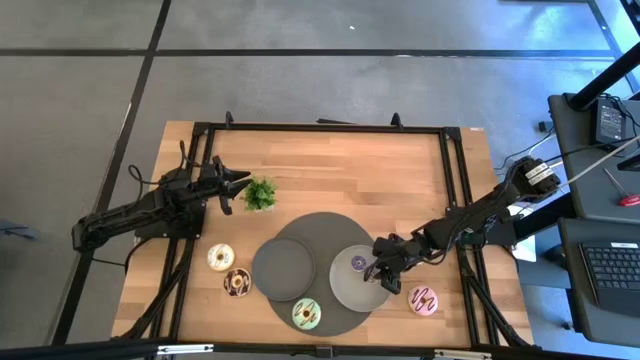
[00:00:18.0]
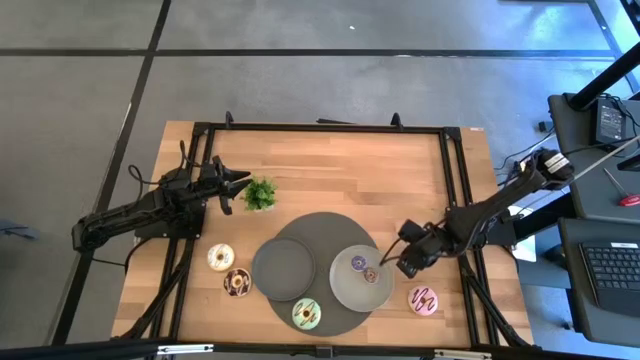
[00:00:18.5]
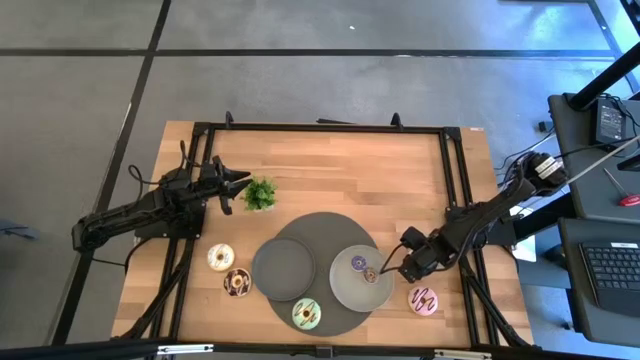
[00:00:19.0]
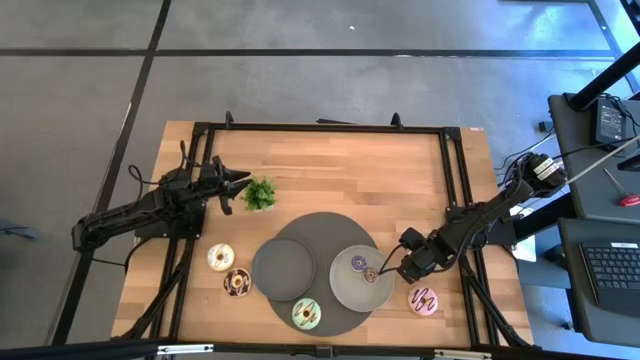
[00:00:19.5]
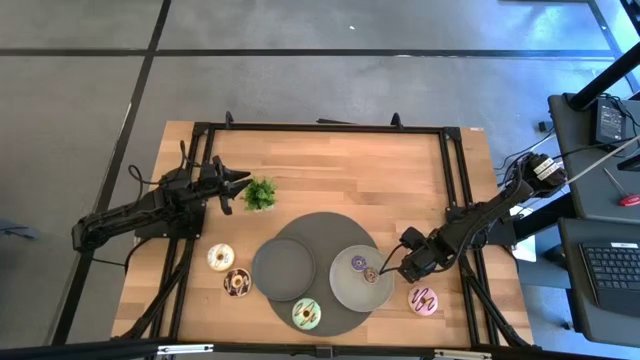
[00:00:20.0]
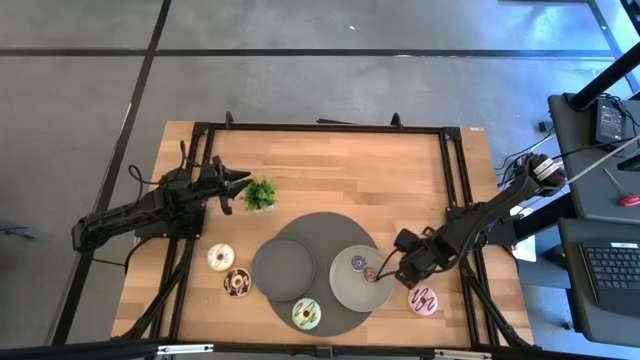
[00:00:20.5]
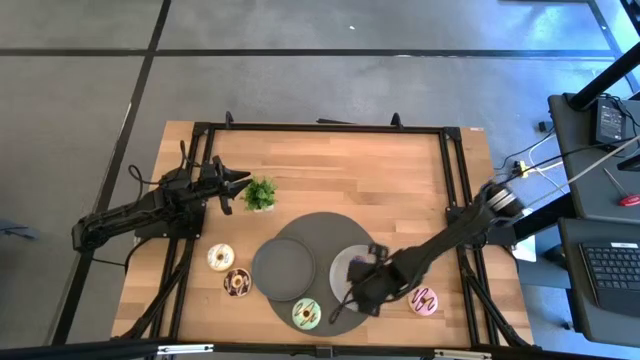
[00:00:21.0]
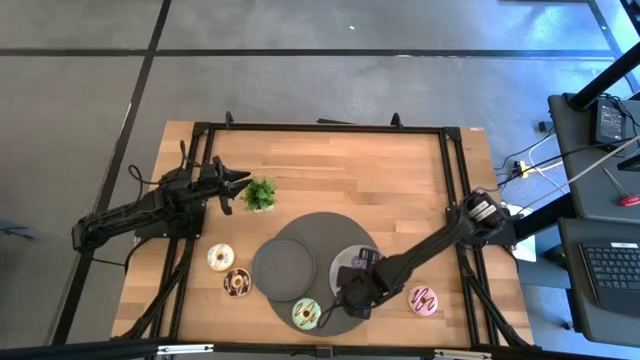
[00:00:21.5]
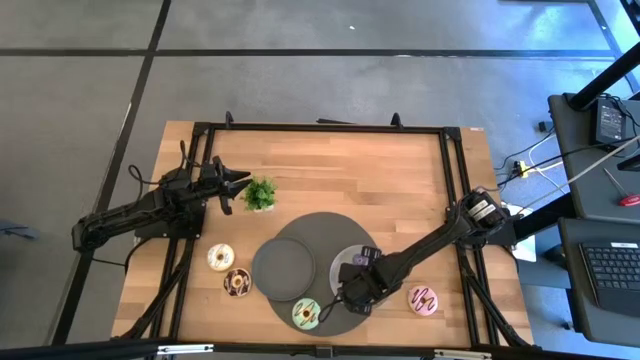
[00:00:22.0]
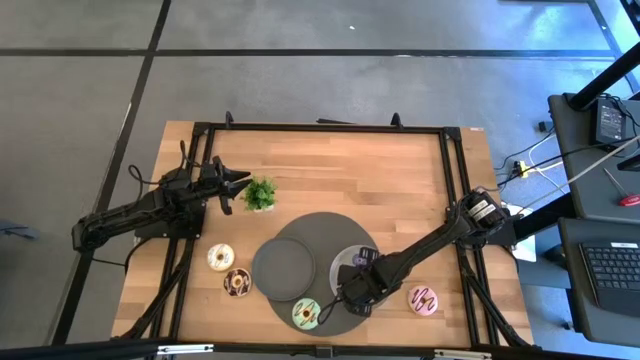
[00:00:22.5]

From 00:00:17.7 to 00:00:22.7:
Task: Pick & Place donuts
Put the small black donut on the light gray plate

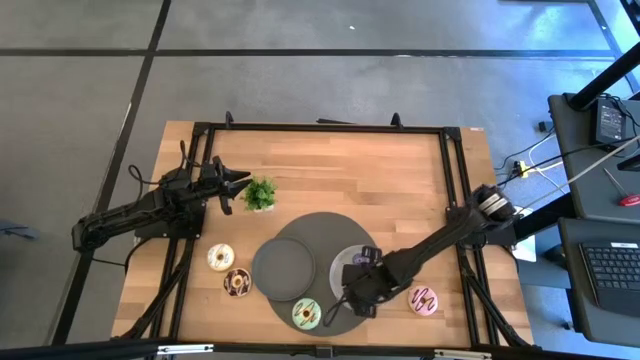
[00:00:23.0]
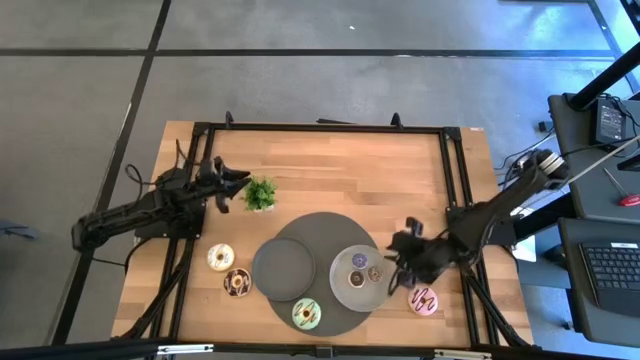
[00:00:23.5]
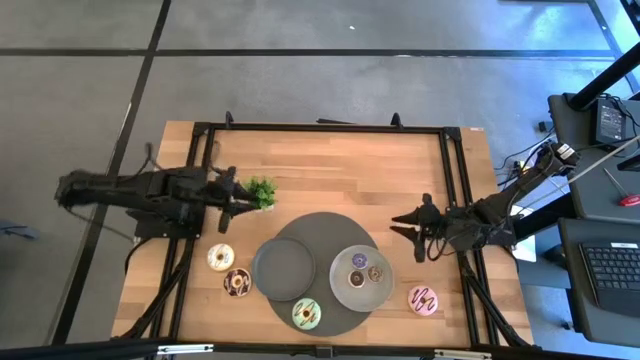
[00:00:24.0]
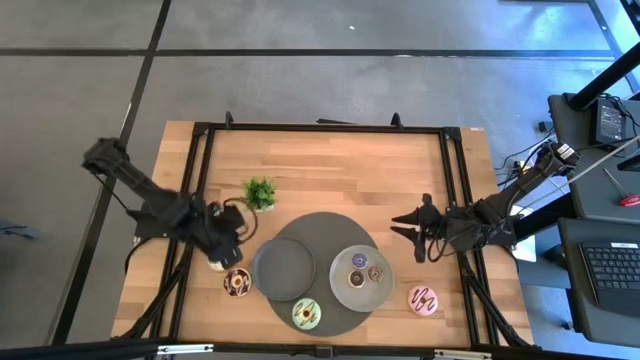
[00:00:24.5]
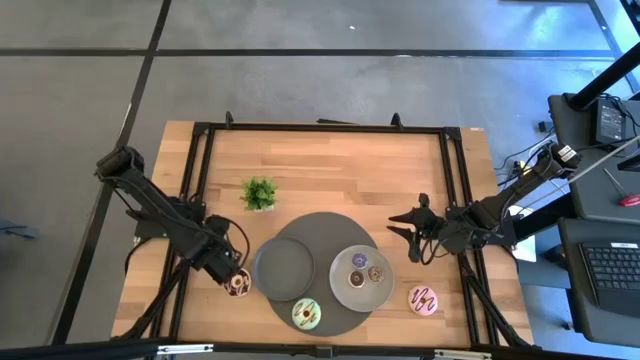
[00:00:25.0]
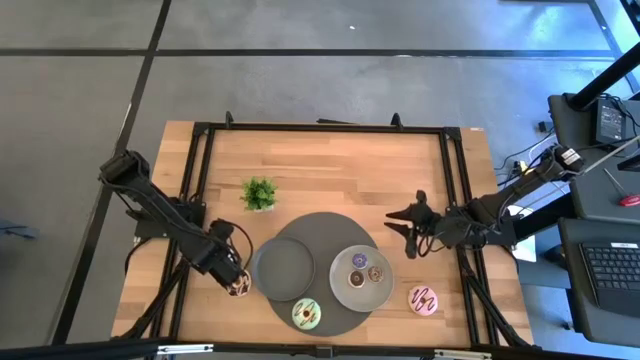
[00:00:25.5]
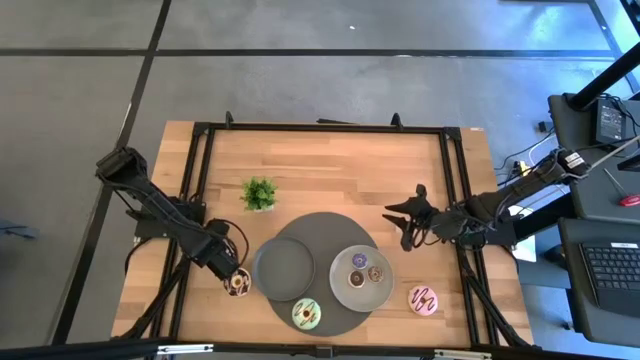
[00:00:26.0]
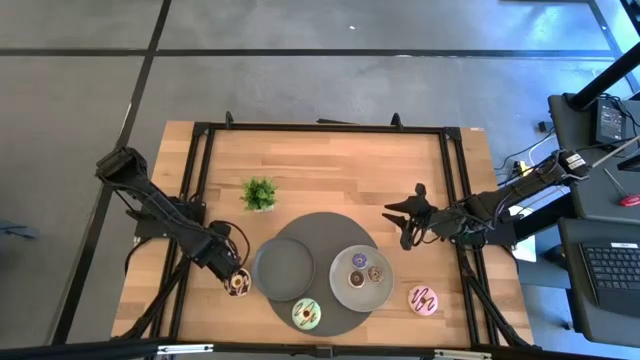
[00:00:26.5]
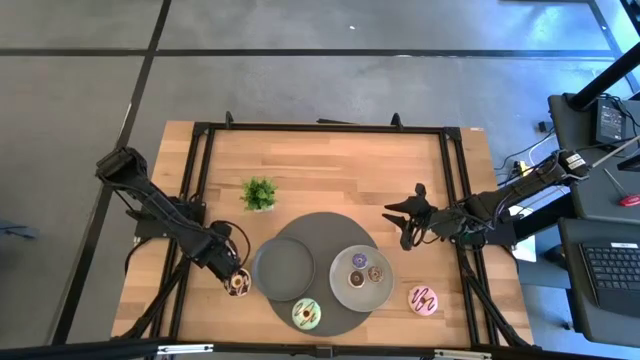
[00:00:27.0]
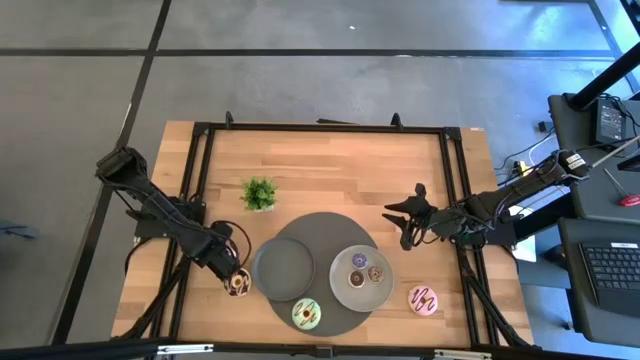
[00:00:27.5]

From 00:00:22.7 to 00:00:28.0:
Put the large white donut on the dark gray plate

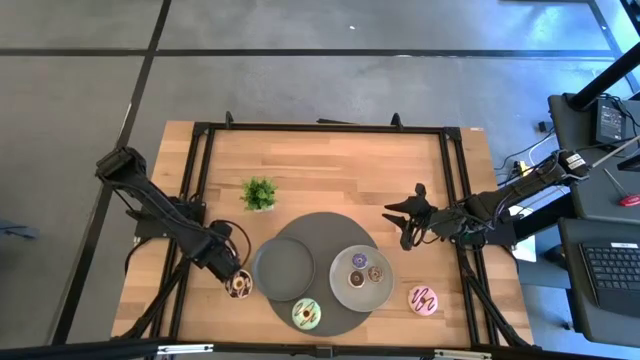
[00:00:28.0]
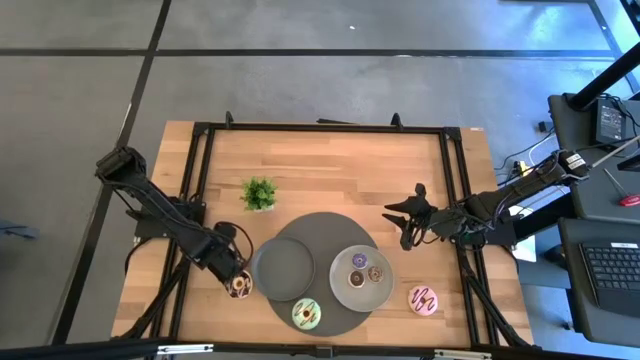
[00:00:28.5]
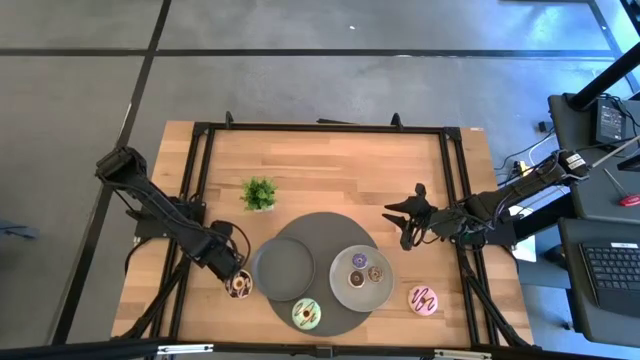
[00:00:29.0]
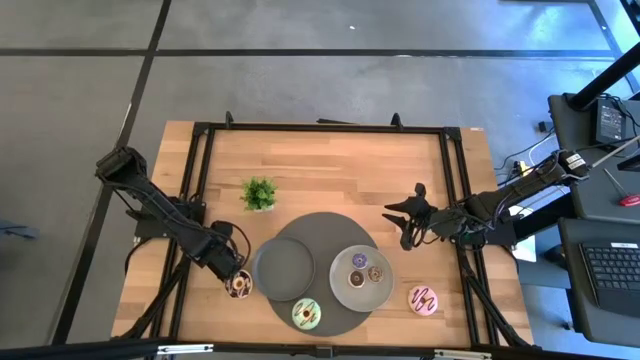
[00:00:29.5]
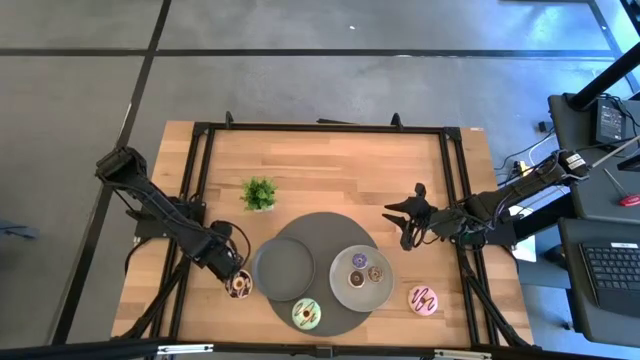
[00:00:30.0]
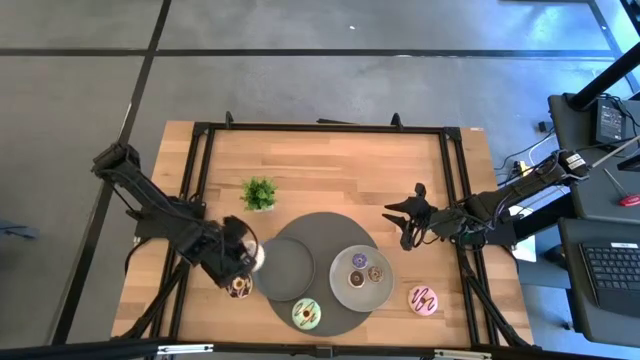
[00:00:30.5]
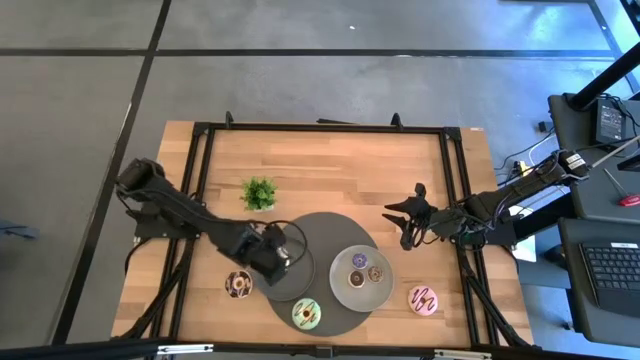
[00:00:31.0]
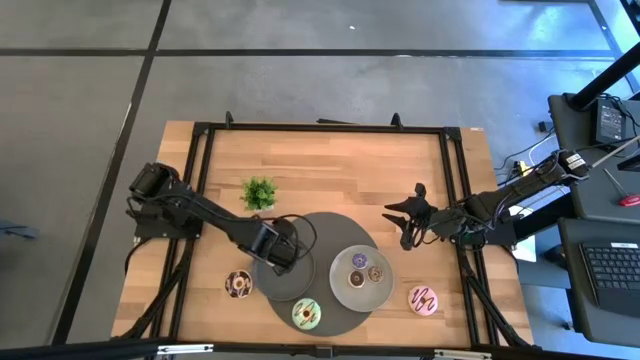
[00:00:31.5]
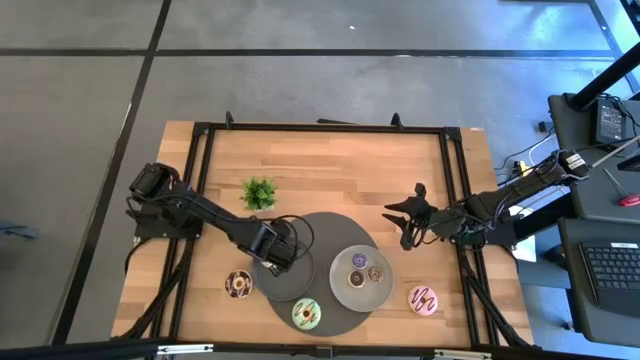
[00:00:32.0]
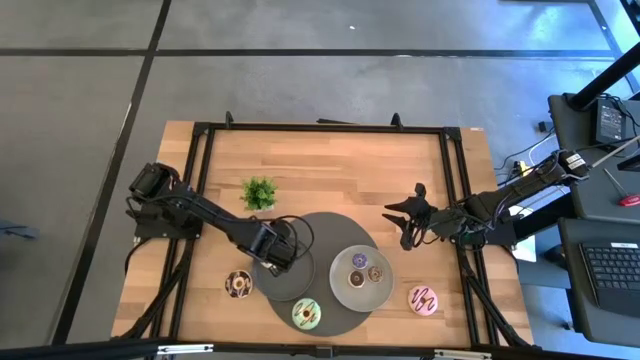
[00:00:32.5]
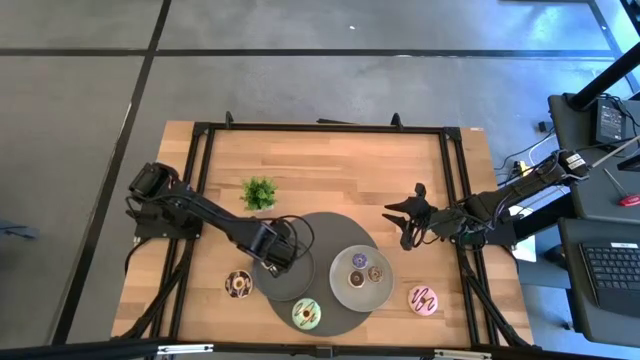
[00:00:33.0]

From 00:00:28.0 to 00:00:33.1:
Put the large white donut on the dark gray plate

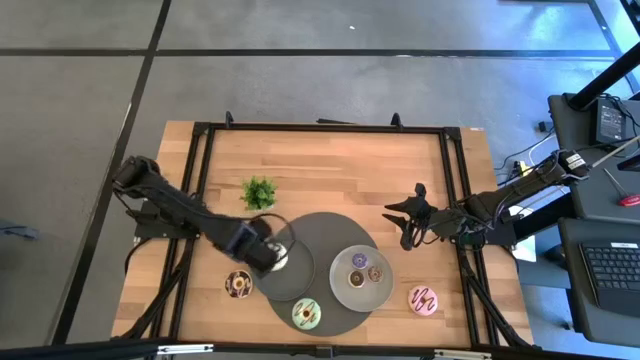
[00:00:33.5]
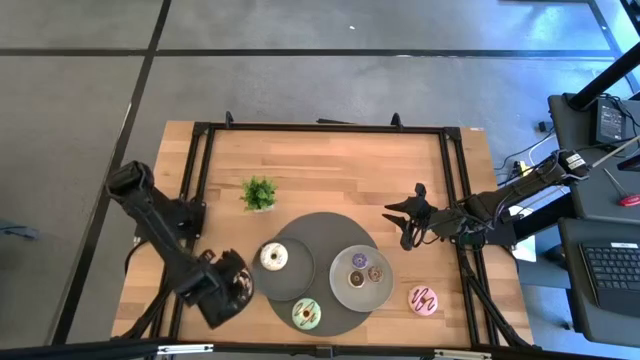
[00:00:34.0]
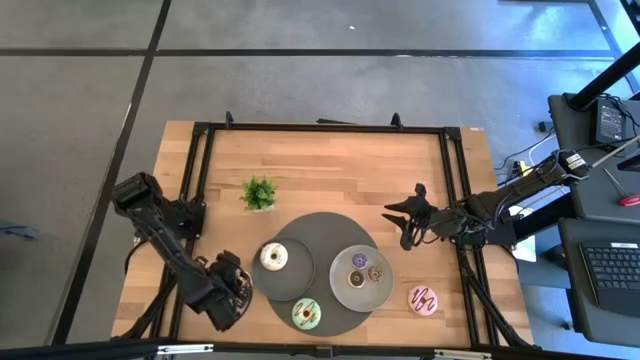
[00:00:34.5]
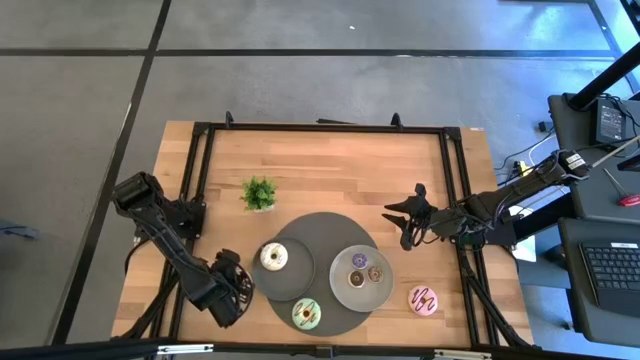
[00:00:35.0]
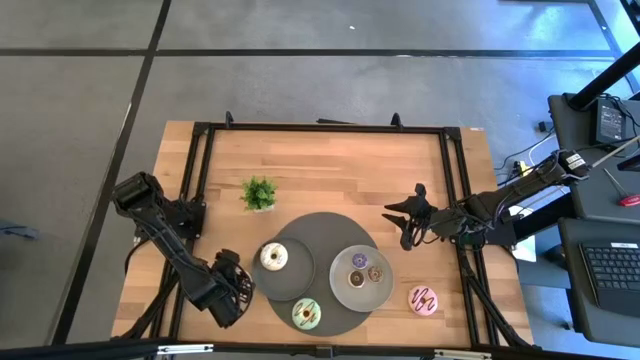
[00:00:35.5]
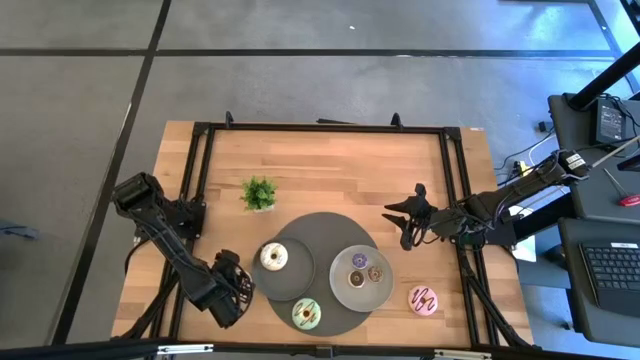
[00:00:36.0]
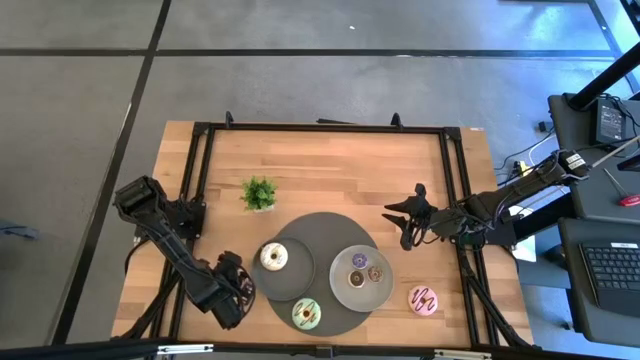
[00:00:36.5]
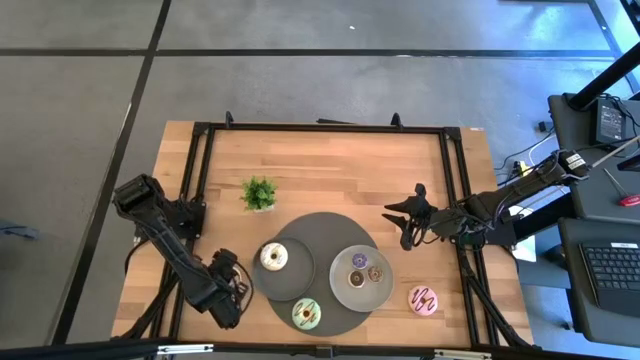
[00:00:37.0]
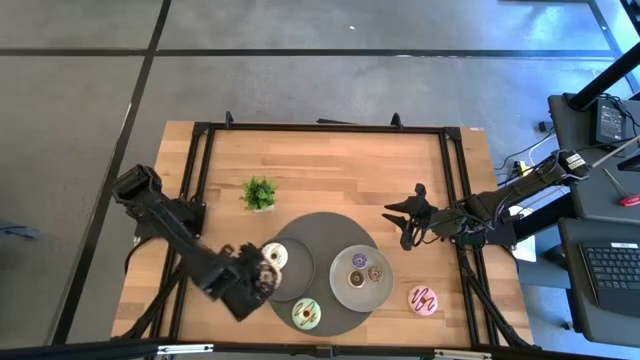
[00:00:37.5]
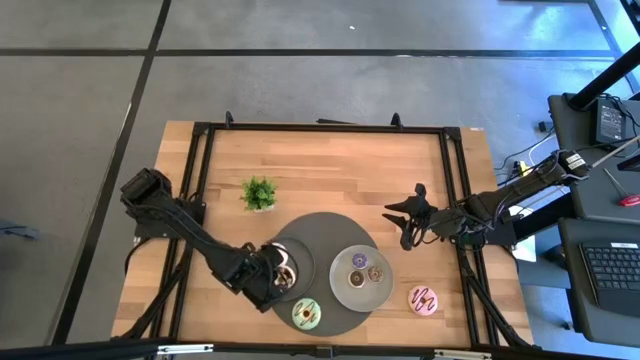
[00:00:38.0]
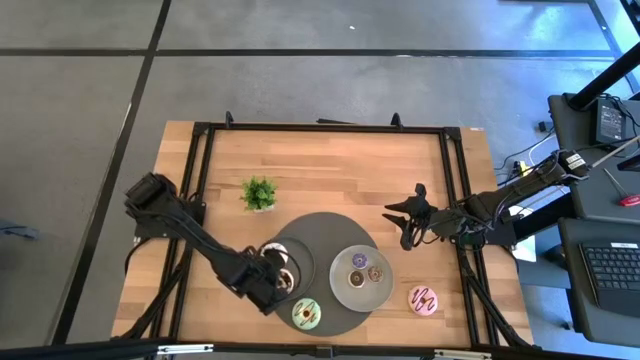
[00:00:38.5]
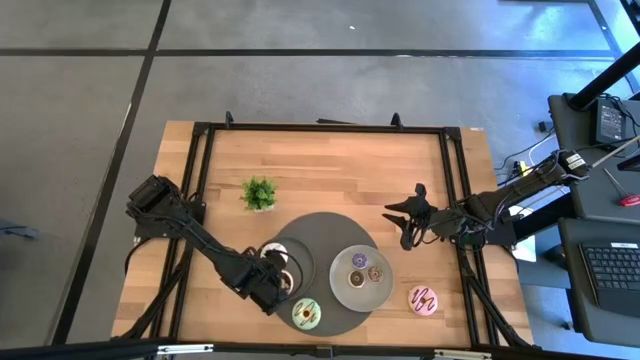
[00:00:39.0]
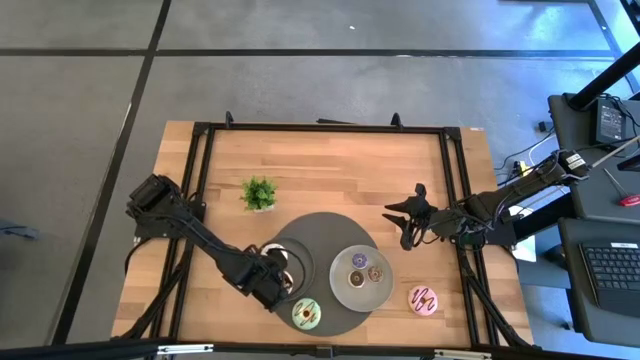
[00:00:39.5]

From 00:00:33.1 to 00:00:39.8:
Put the large black donut on the dark gray plate
